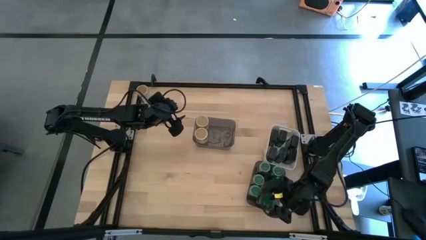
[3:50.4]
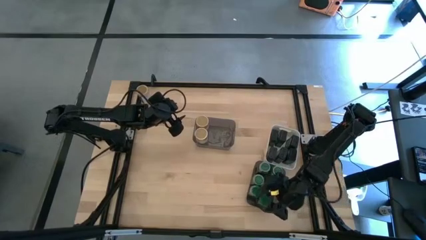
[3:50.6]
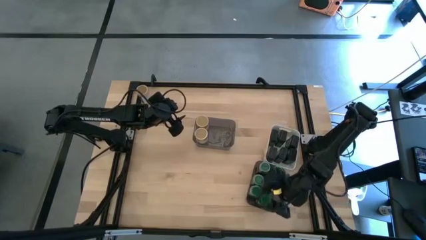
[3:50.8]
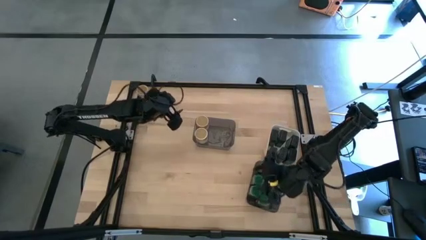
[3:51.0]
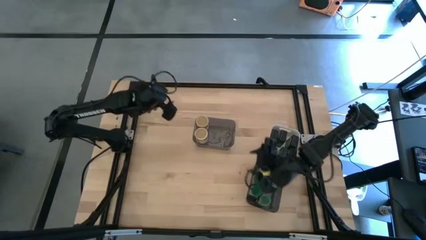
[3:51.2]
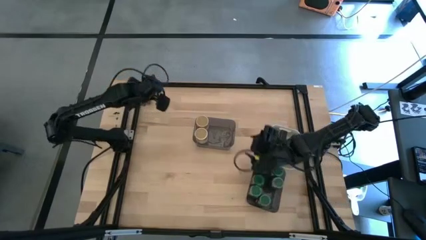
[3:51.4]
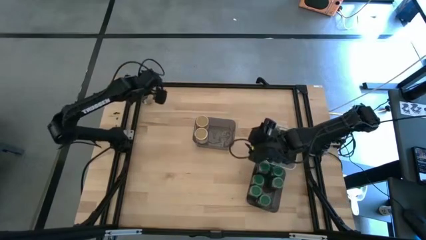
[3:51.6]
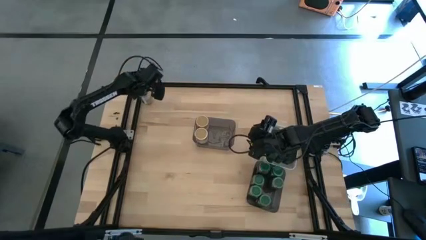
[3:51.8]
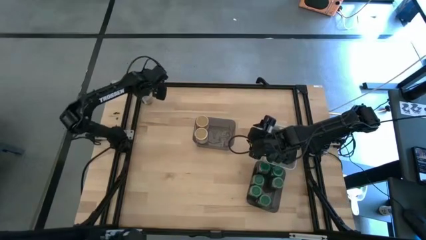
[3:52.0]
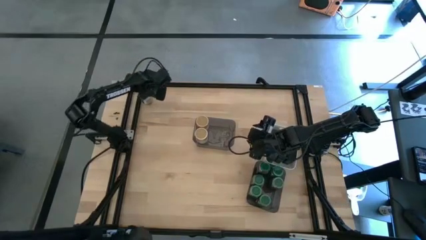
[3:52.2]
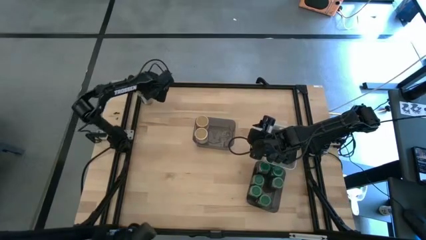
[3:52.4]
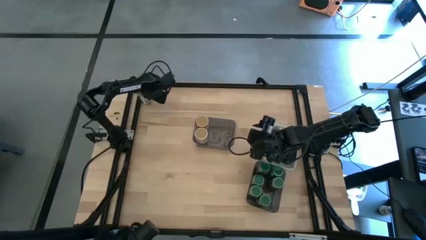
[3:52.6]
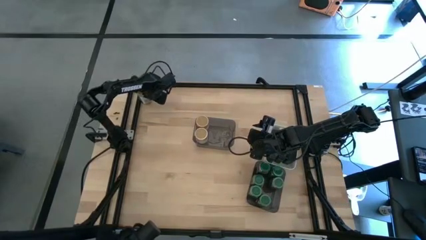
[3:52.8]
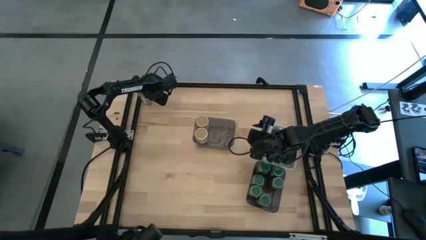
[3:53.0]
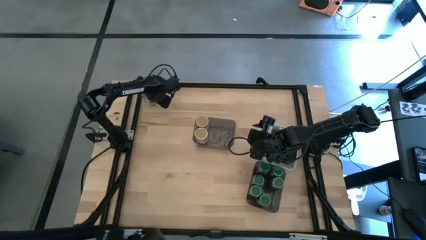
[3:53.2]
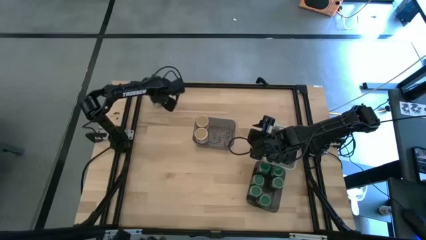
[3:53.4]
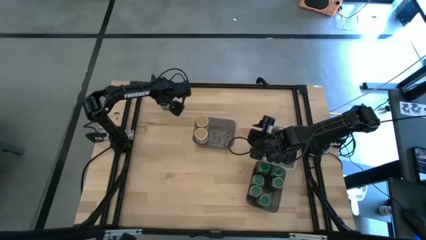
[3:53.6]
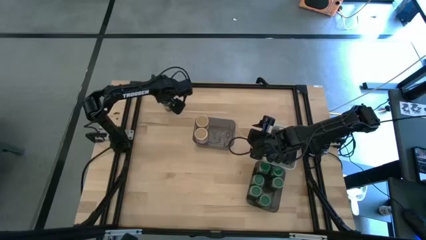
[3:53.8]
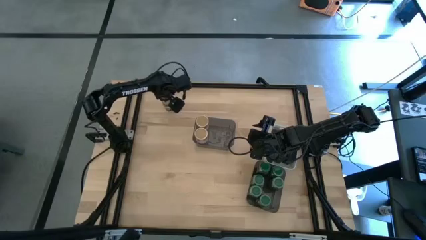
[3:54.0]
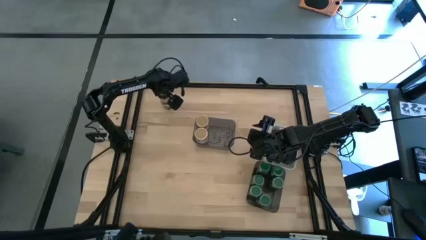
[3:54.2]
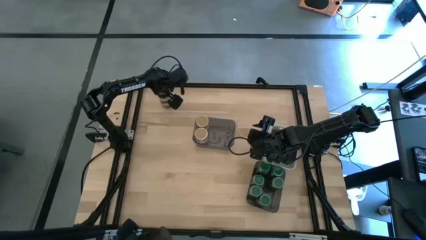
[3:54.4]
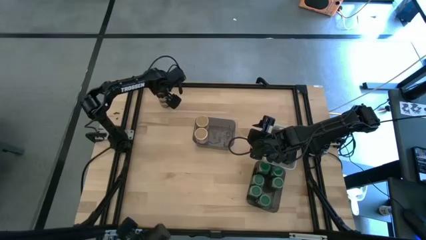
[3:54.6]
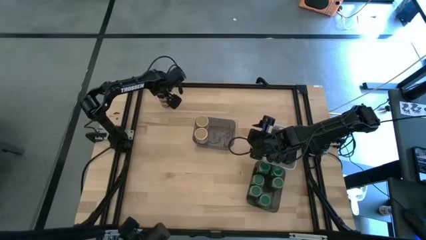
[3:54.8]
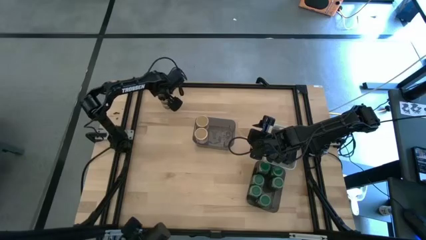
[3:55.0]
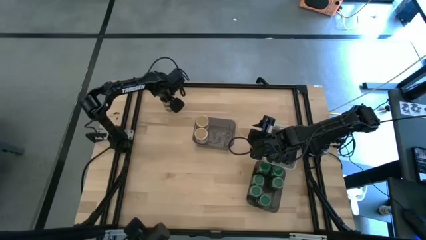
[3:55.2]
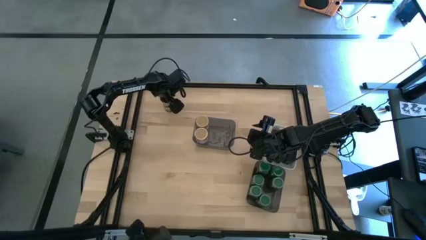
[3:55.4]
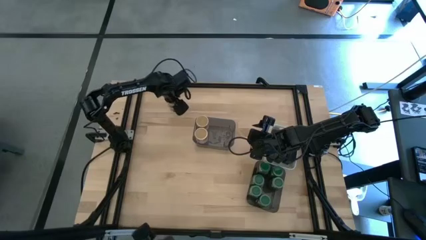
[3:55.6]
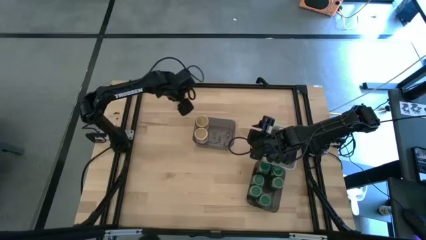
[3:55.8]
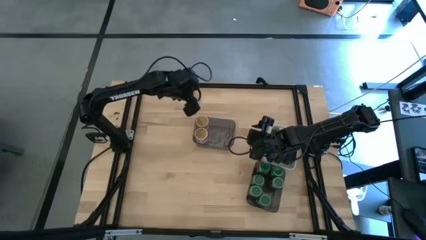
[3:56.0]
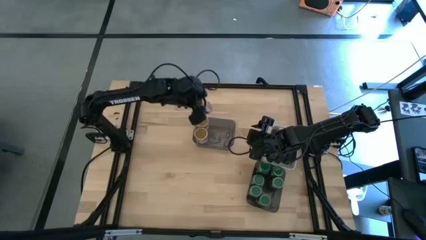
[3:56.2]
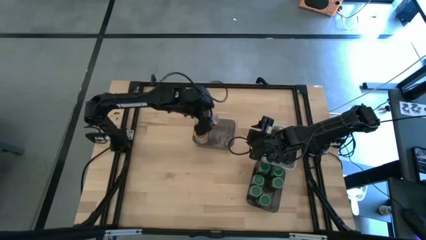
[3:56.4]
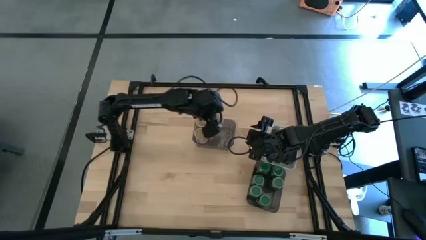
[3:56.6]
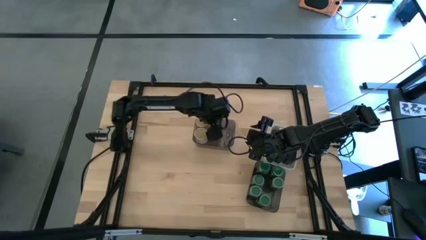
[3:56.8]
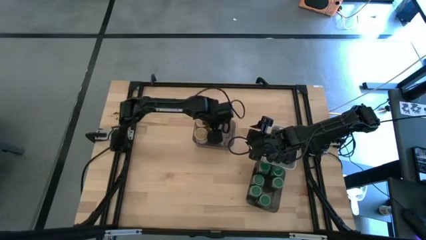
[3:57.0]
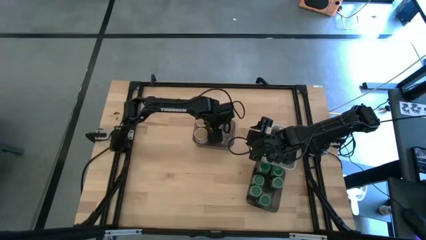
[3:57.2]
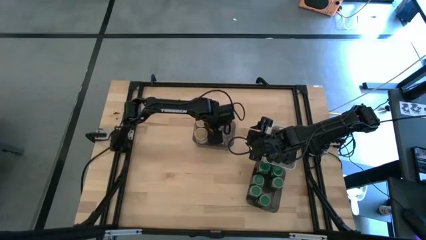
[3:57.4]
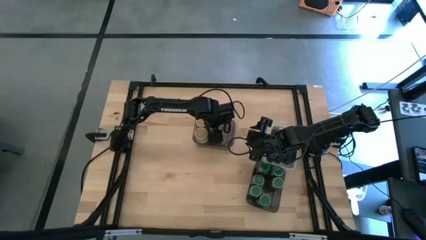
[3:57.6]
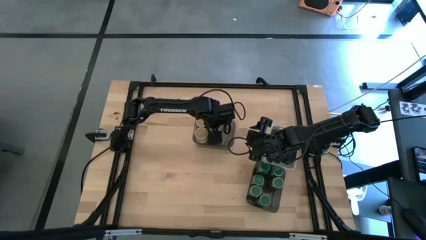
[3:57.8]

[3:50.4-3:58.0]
Task: Sort spices by type
Put the brown seasoning bottle into the top black bin

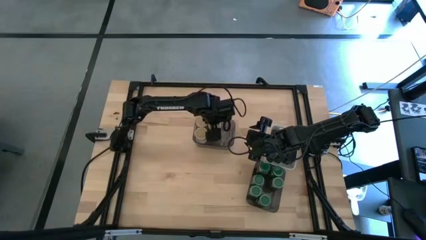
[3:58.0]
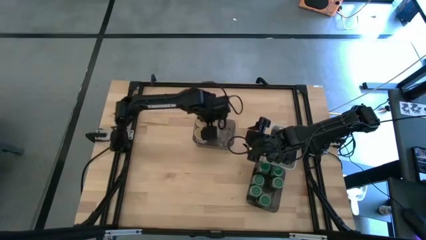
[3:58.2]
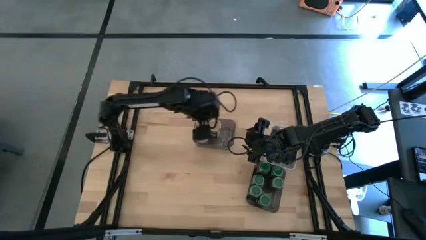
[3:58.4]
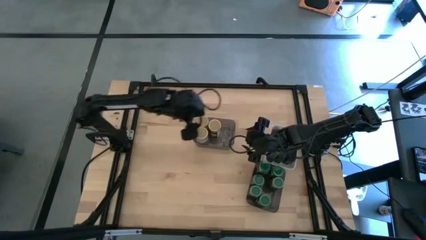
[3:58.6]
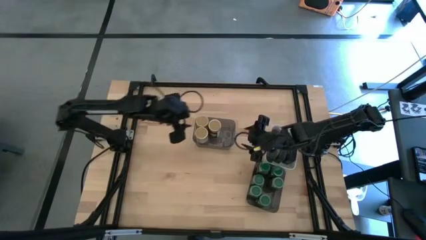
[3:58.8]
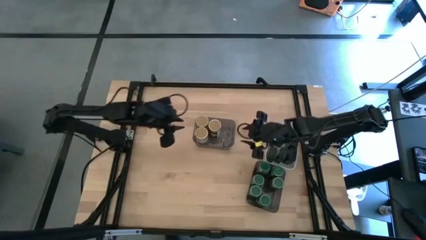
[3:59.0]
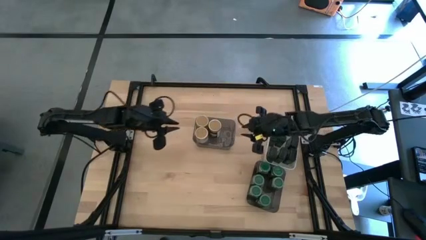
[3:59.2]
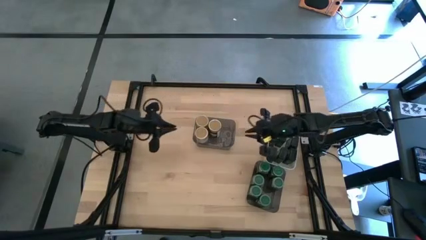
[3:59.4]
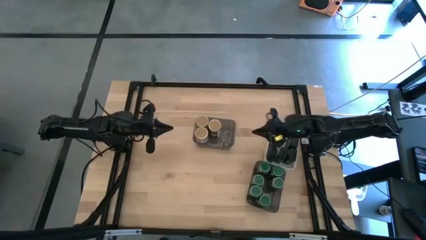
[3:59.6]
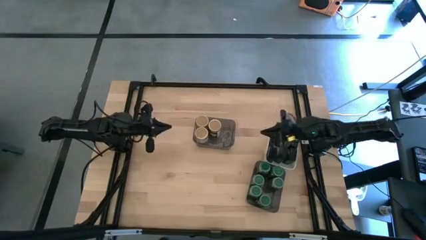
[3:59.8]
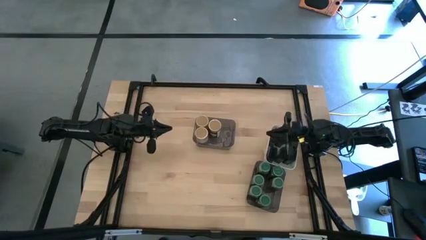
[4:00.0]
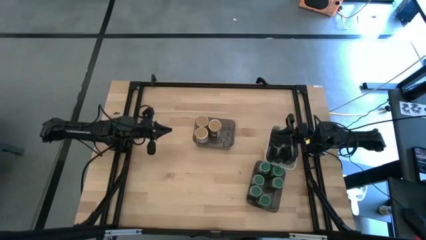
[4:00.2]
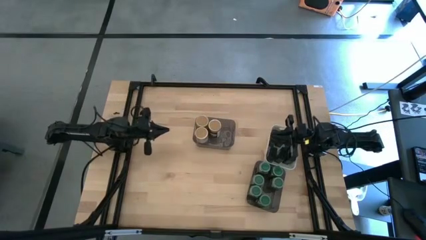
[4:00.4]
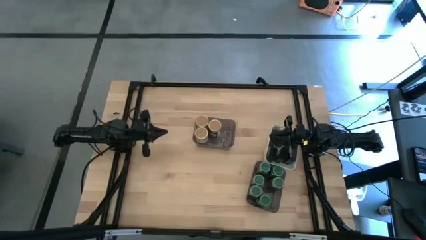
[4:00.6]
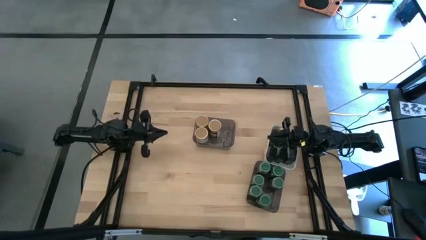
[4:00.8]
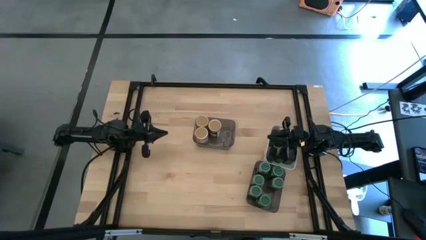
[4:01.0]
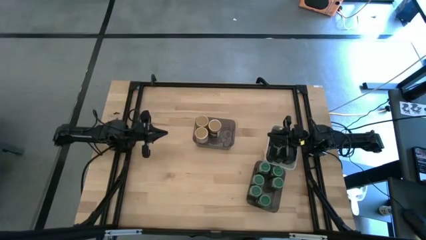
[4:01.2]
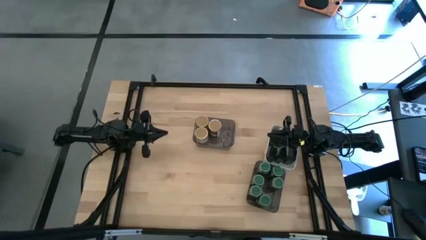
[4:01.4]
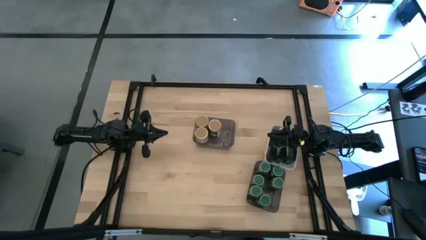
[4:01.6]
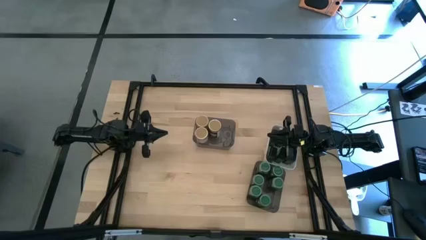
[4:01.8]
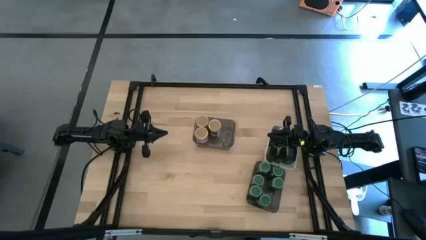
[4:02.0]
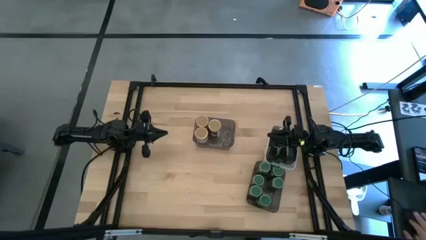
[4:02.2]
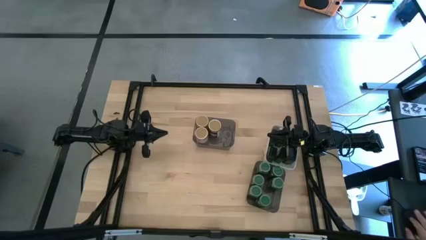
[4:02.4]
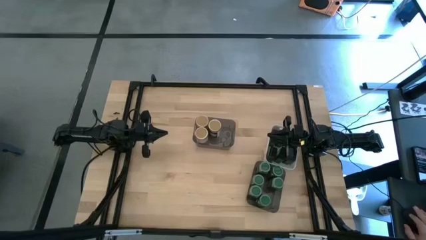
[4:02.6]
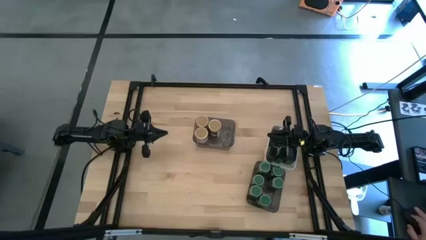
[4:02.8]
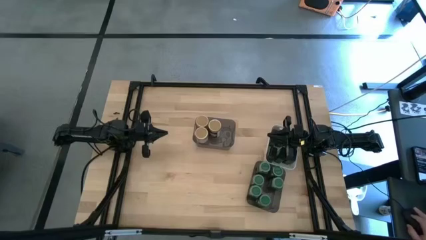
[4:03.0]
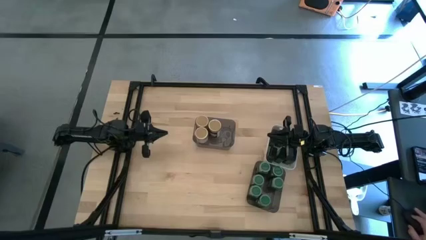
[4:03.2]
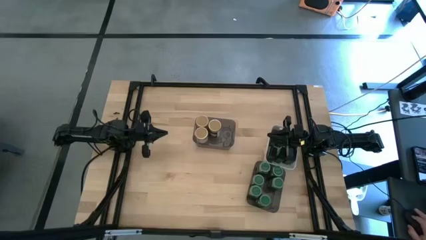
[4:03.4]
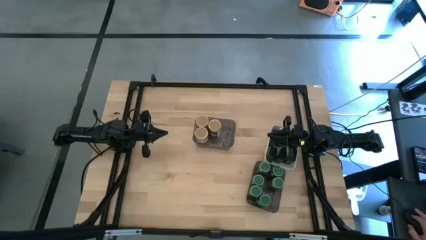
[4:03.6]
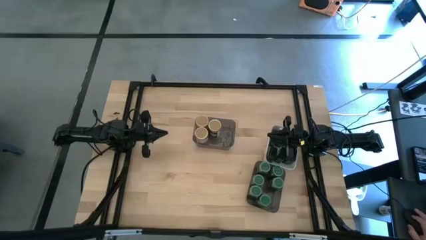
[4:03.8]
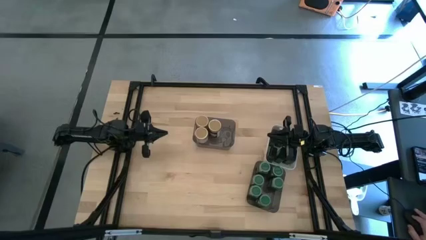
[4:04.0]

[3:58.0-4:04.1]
Return to Home Position

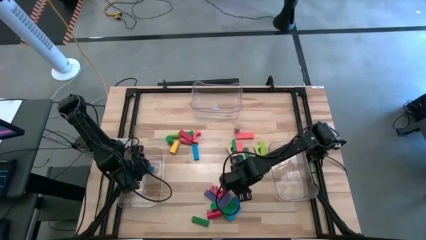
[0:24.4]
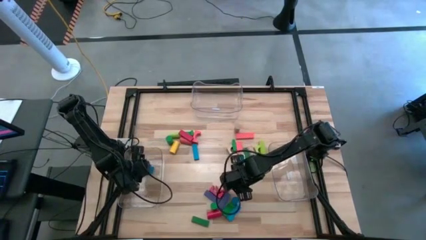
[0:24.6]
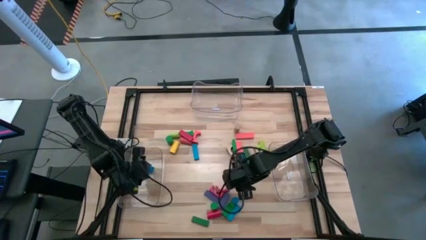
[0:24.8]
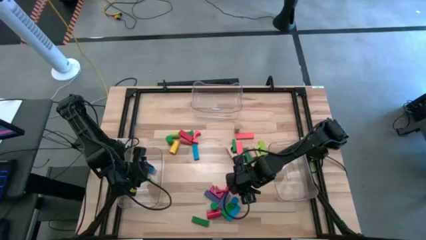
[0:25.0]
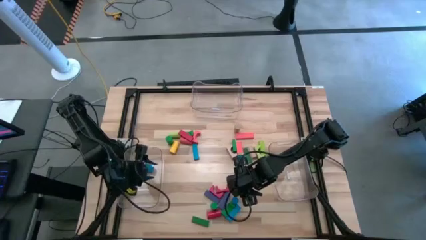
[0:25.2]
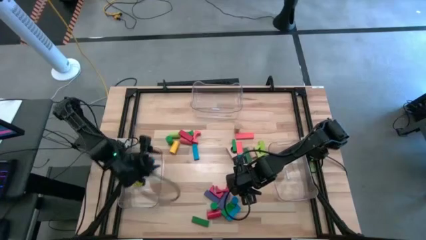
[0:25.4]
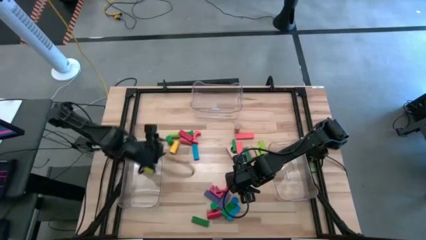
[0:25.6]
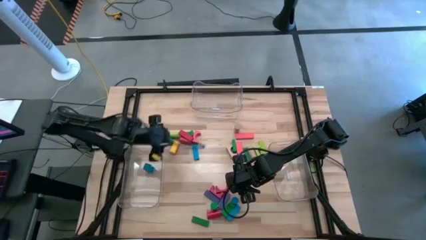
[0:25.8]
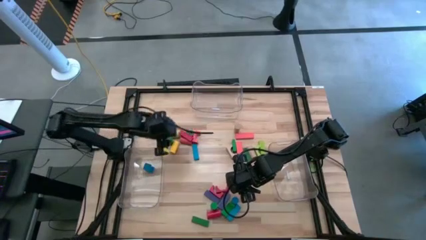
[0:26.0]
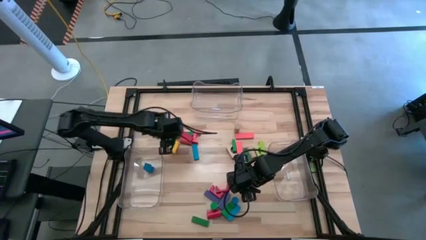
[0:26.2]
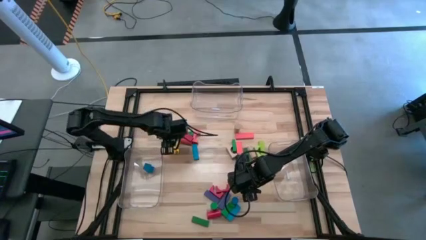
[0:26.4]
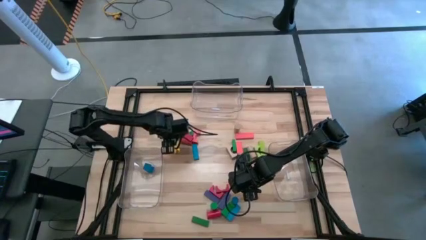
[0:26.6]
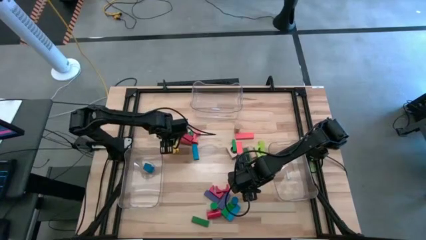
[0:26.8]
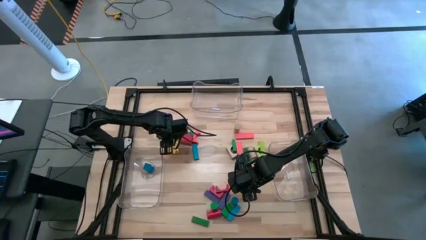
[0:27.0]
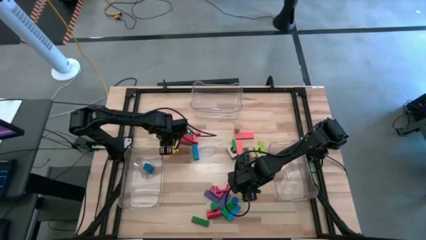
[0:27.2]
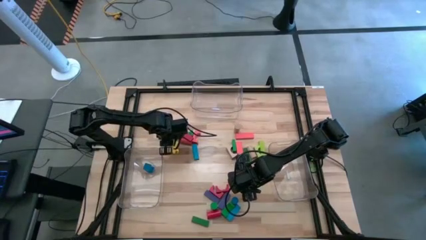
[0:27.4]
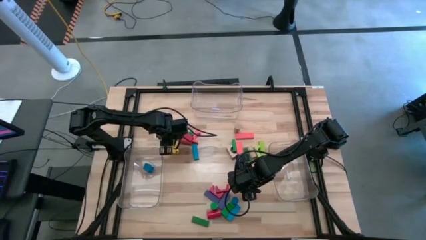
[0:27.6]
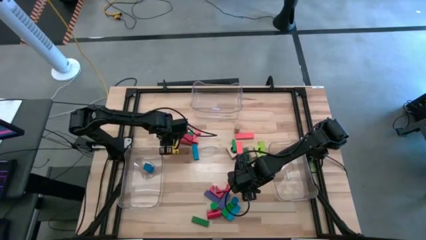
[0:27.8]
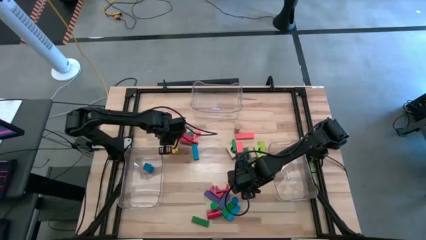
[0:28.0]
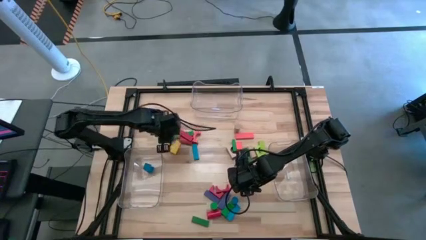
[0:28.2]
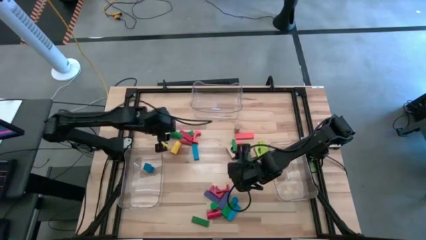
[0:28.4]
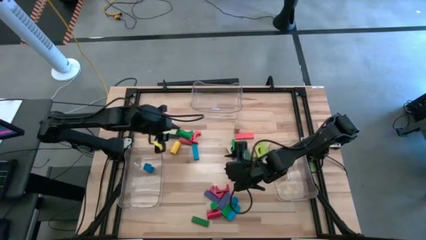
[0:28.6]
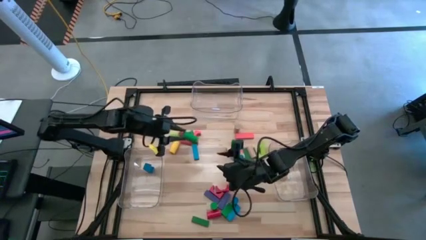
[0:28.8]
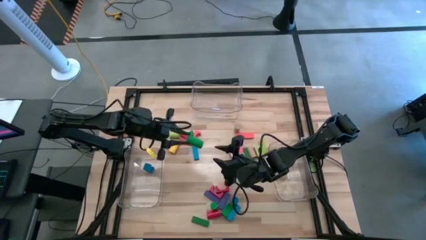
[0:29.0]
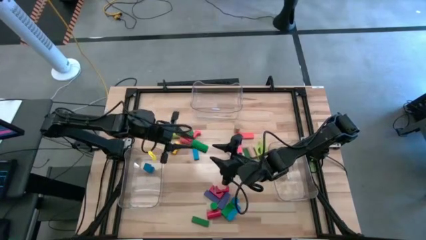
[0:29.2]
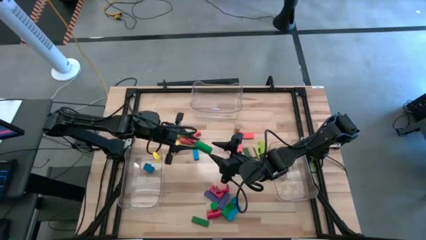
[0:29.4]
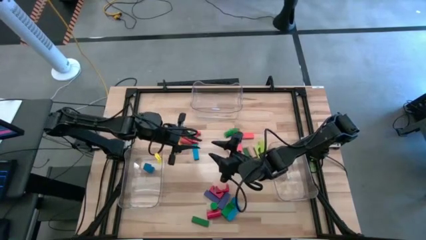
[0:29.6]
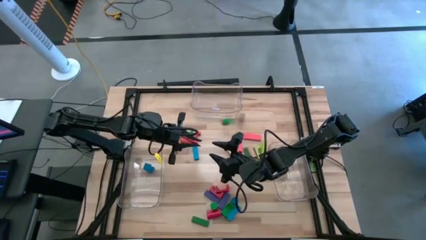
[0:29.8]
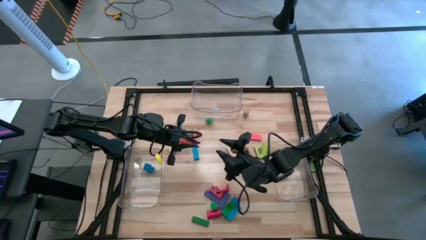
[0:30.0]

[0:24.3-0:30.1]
Task: Sort blocks by size
Put the green cylindrical block into the right transparent bin
